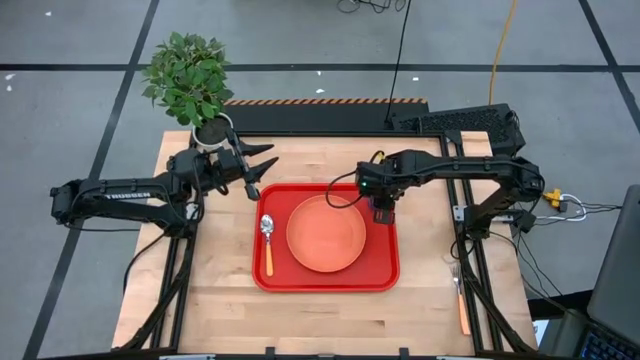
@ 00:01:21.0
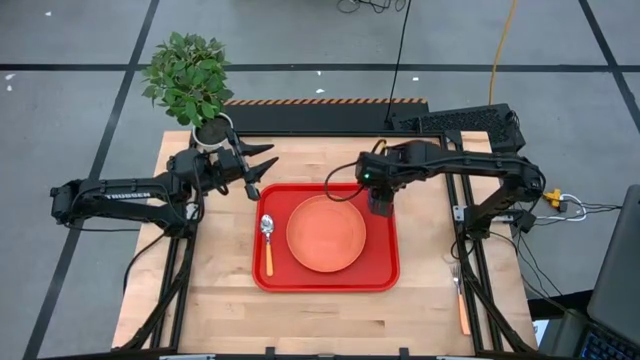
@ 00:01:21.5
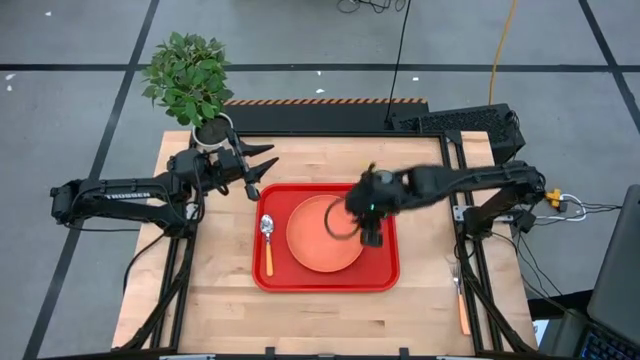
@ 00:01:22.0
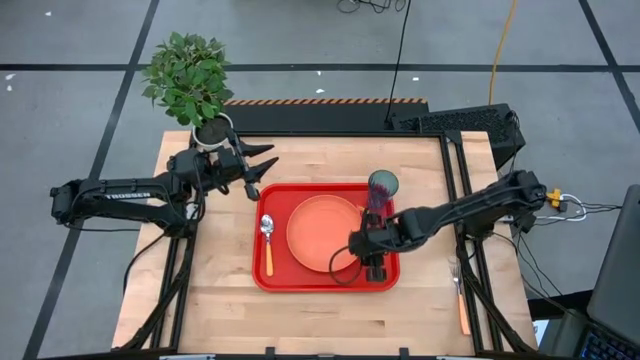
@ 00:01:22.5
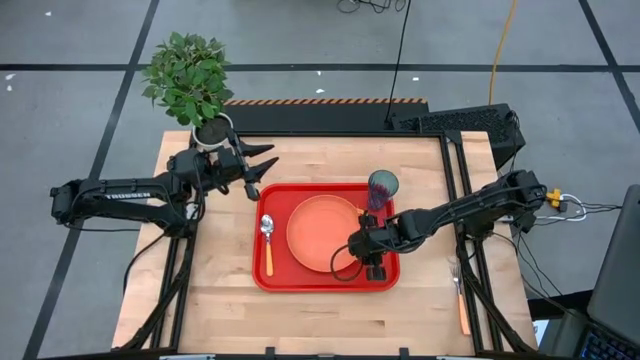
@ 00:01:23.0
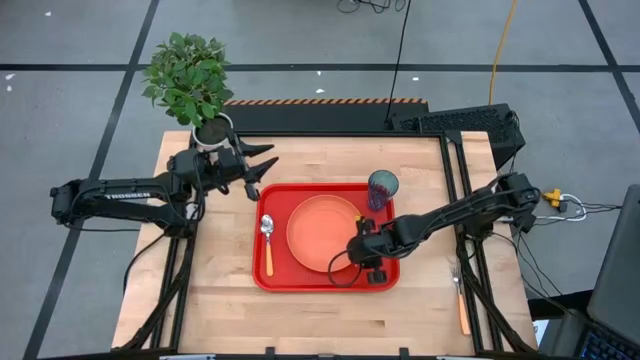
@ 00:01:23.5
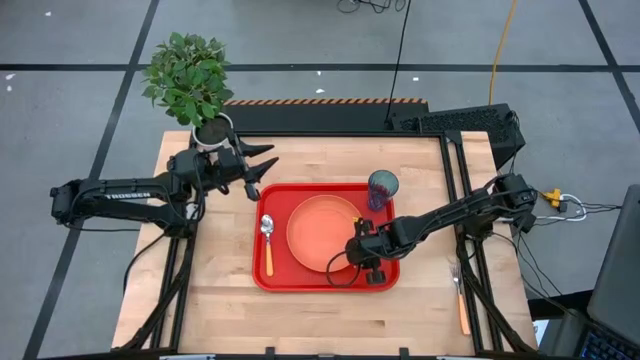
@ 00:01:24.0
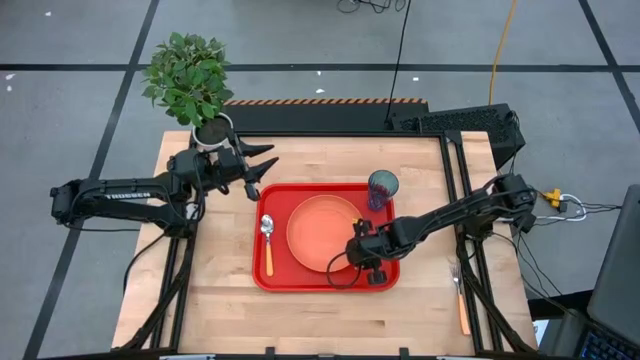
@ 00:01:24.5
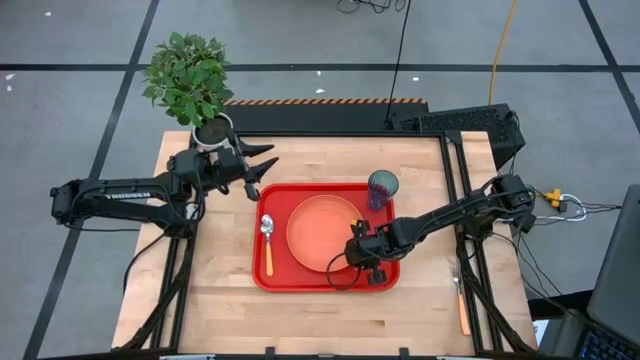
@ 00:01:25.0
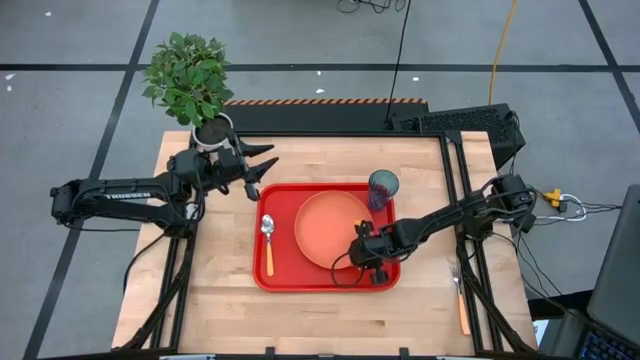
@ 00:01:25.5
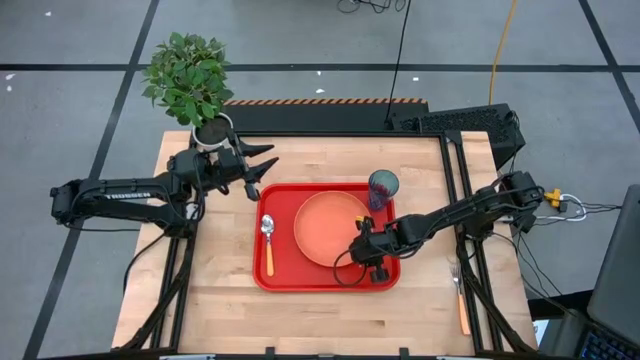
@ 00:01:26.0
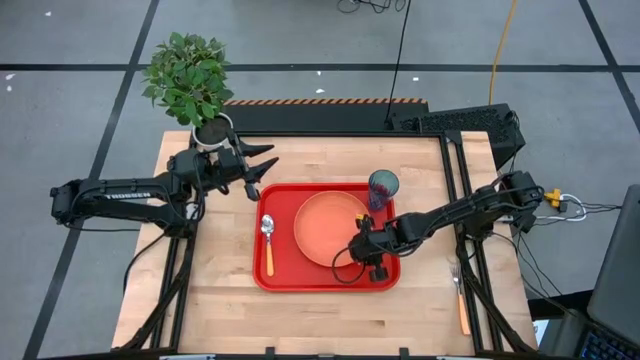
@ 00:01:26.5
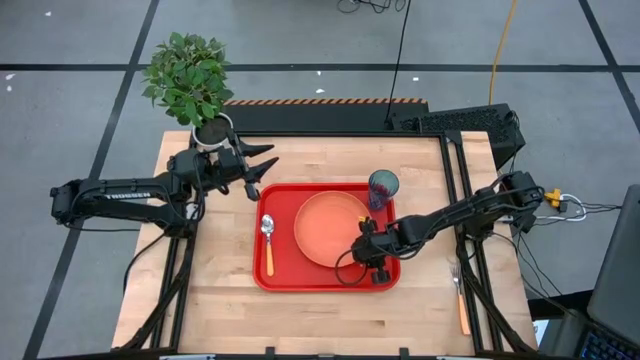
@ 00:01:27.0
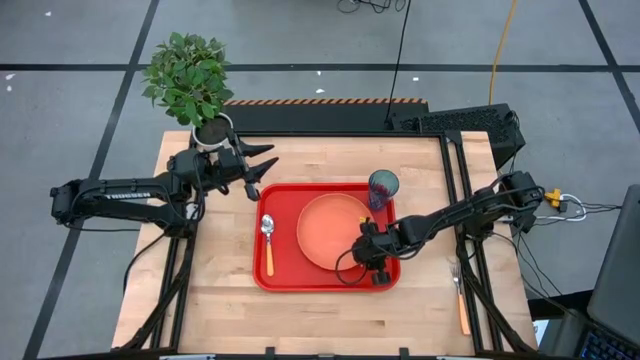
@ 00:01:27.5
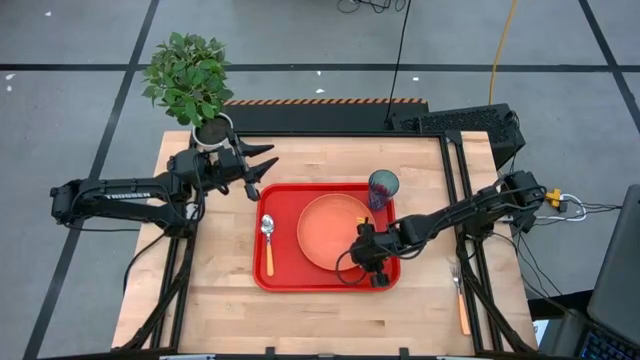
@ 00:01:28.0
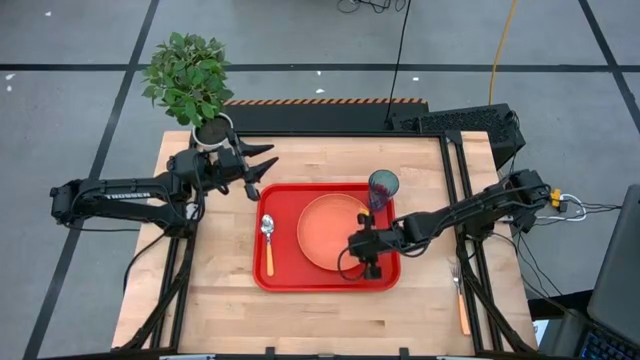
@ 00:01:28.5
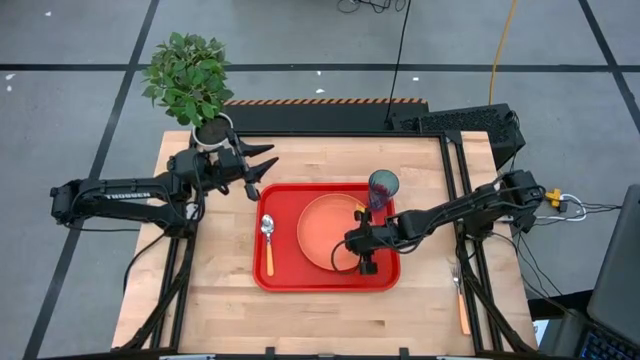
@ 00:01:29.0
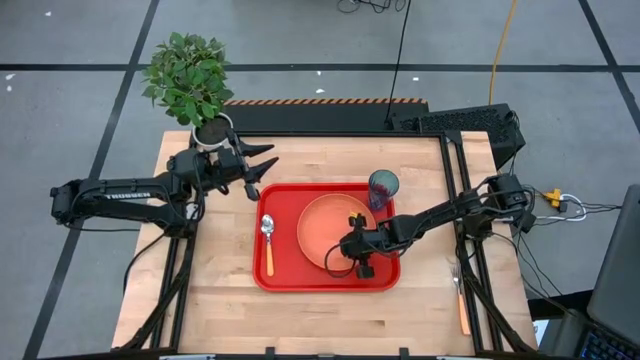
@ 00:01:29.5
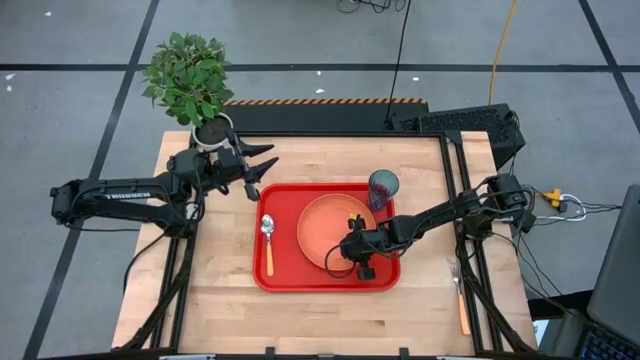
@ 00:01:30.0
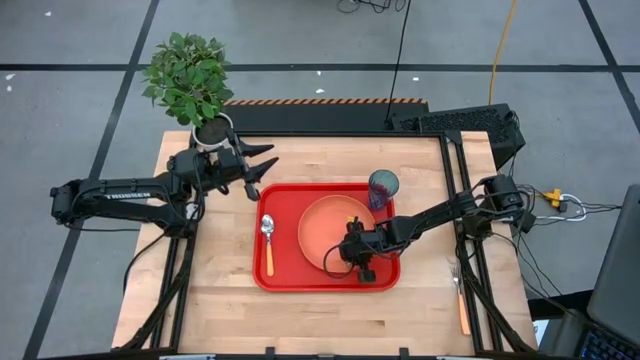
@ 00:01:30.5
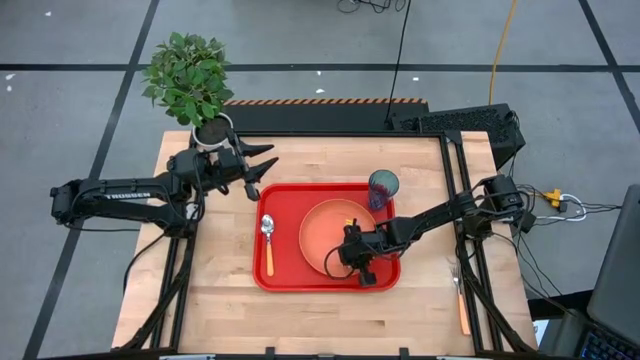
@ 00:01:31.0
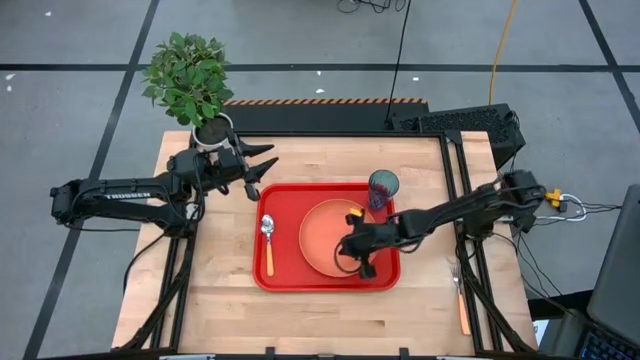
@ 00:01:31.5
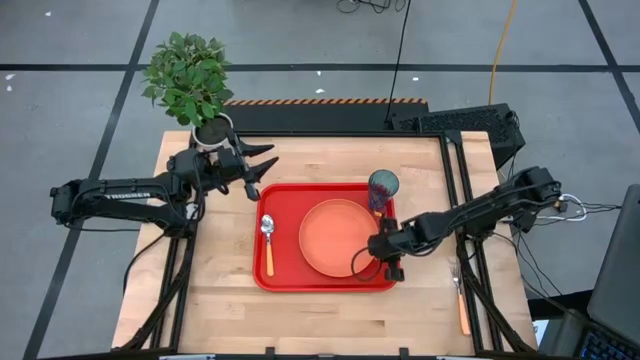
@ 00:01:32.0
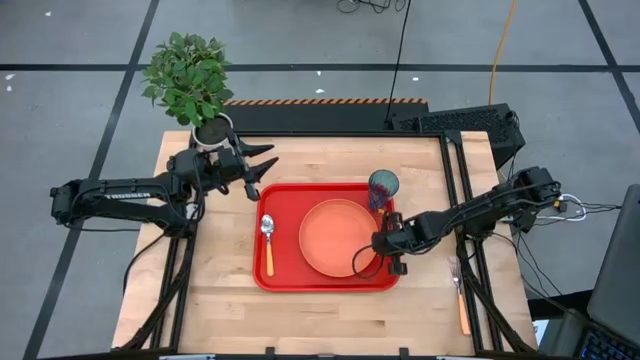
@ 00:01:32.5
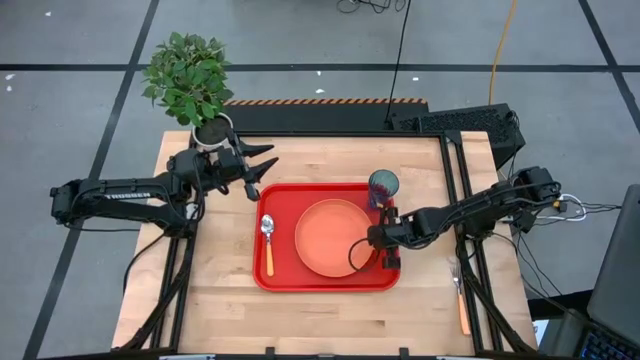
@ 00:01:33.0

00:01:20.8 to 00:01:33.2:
Task: Pick and place plate/cup/fork/spoon on tray
Adjust the orange plate on the red tray

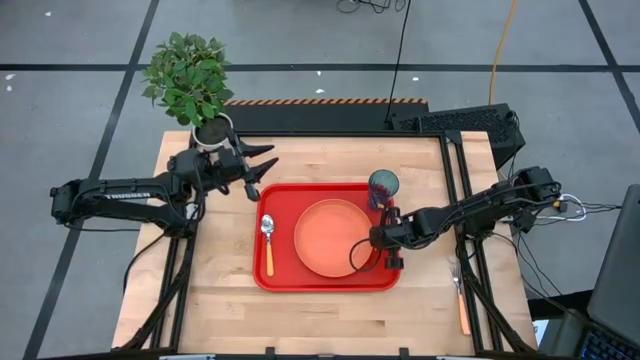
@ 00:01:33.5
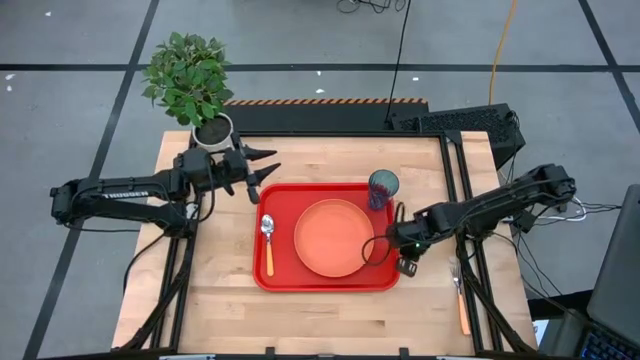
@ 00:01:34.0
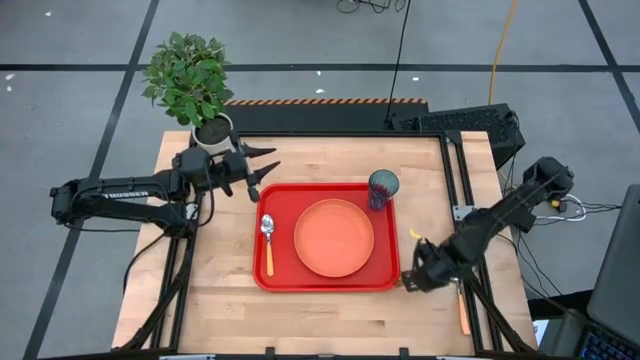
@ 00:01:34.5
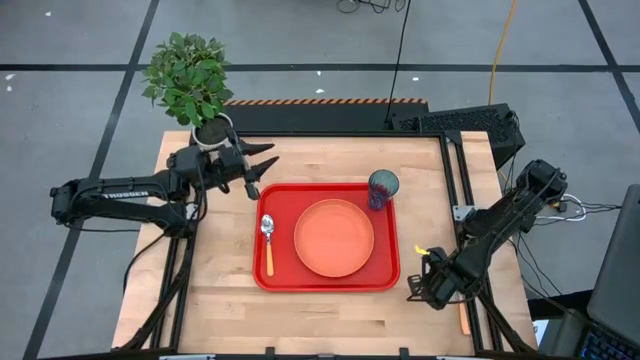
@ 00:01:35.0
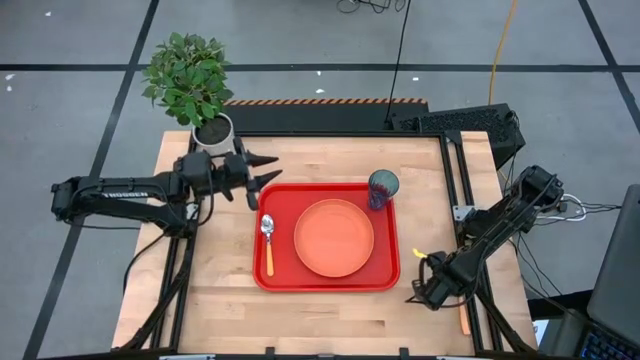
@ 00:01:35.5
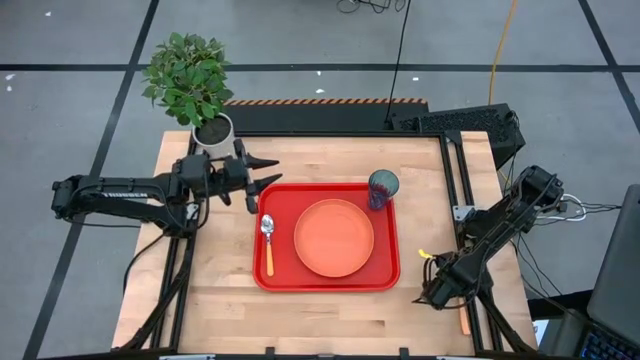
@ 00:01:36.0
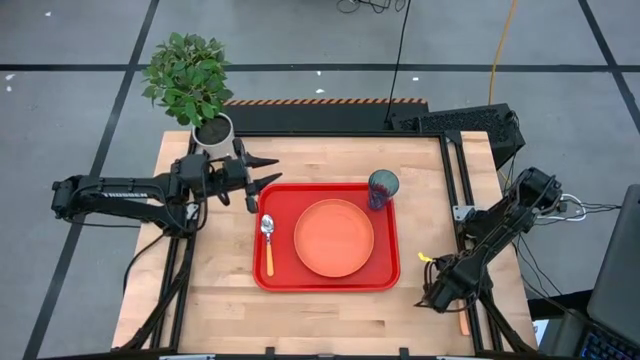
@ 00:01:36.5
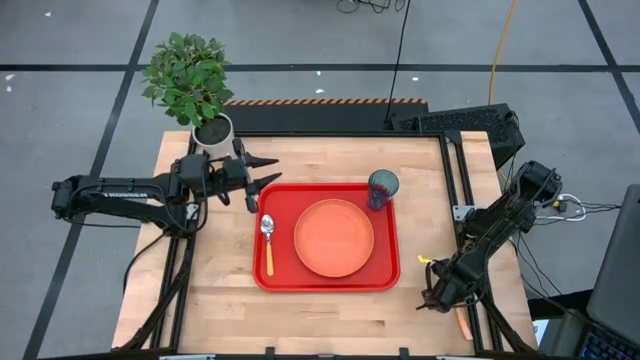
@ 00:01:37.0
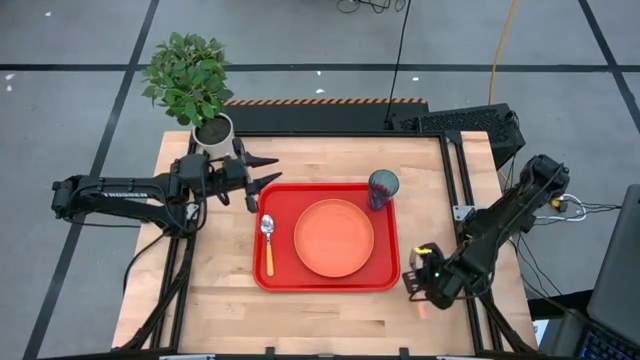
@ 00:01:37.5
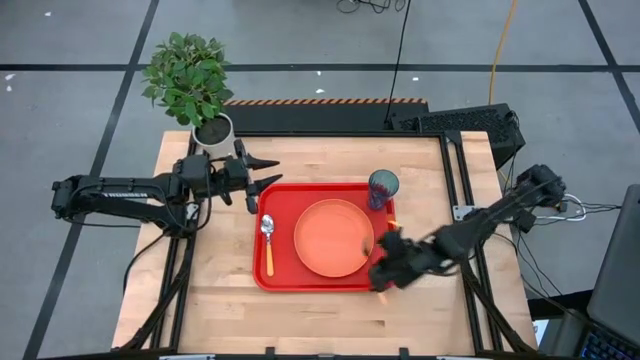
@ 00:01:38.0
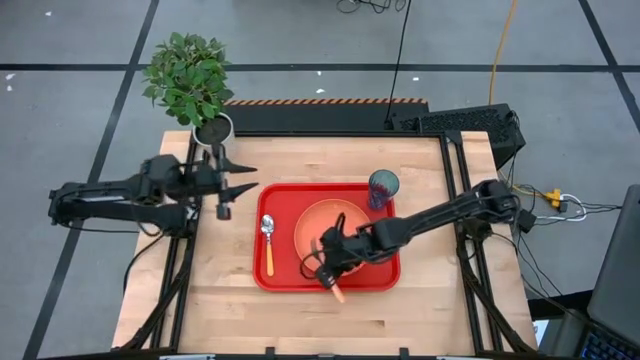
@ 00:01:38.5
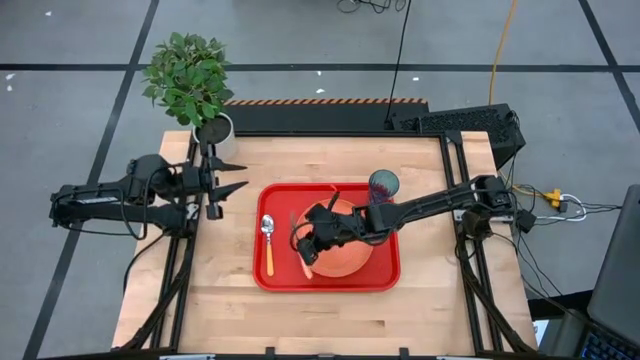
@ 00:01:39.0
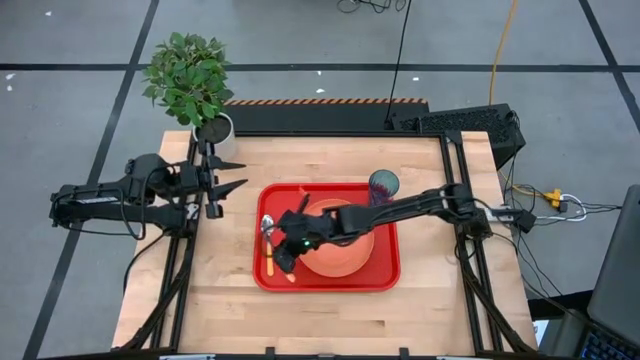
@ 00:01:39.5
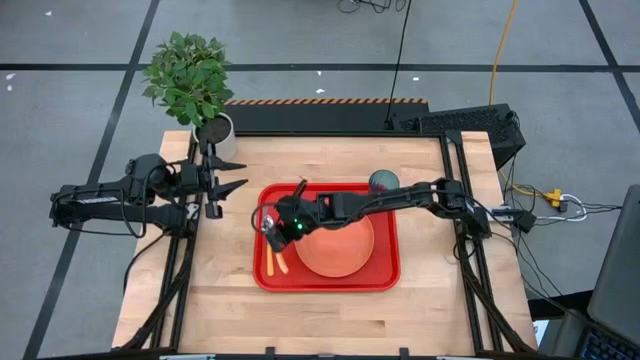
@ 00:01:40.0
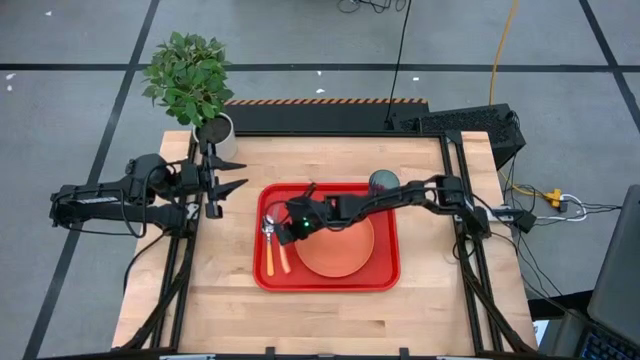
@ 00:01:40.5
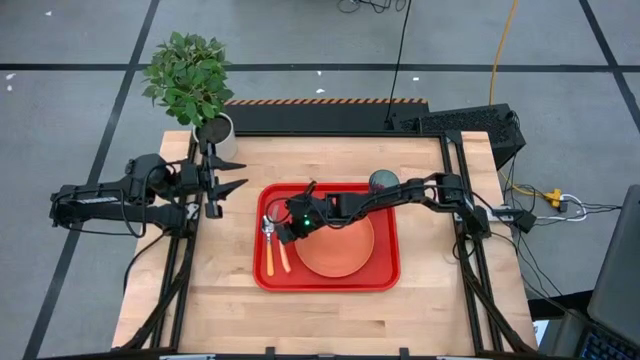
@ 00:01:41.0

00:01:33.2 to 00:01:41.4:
Put the orange fork on the red tray to the right of the yellow spoon

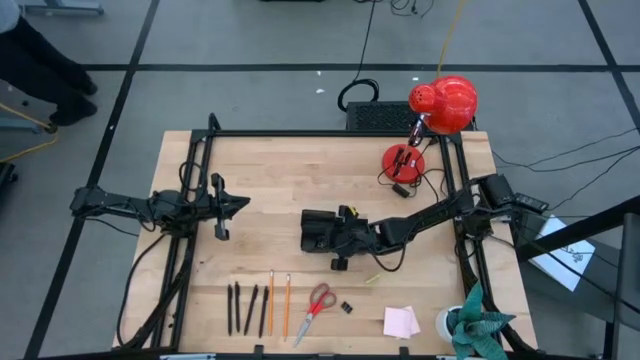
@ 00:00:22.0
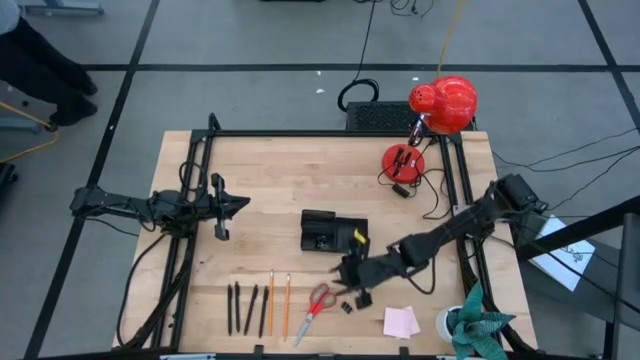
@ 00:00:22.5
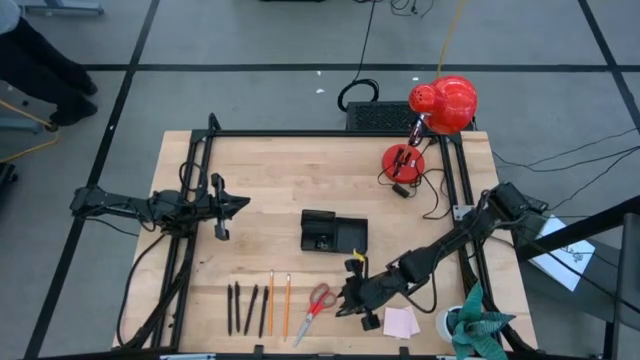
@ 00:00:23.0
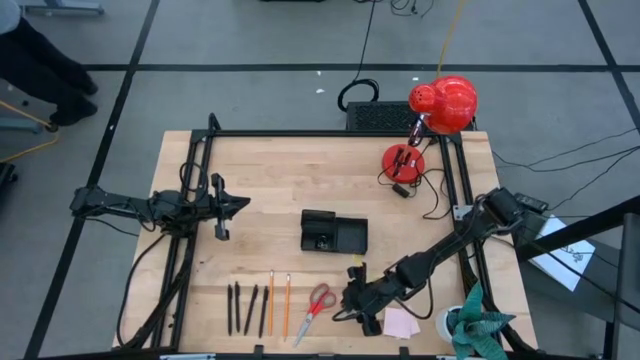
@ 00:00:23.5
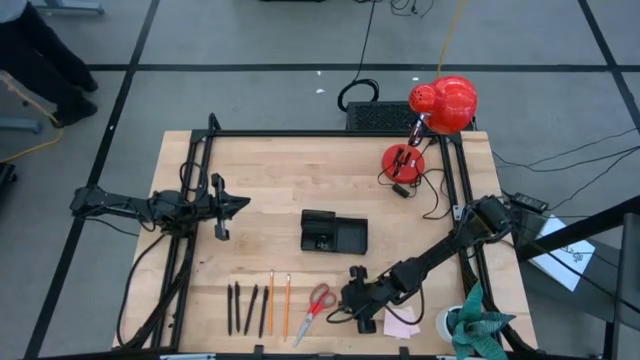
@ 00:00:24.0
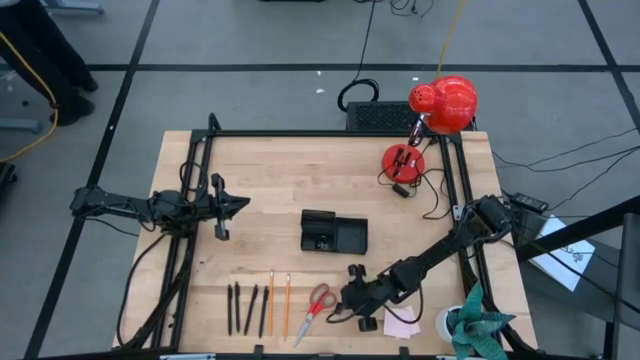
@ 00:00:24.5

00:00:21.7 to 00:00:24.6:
Task: Pick and place office supplies into organizer
Put the binder clip into the desk organizer
